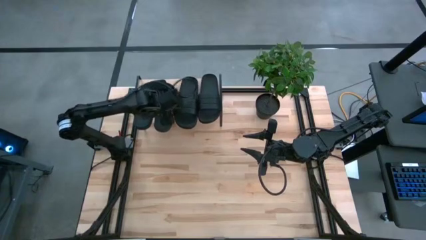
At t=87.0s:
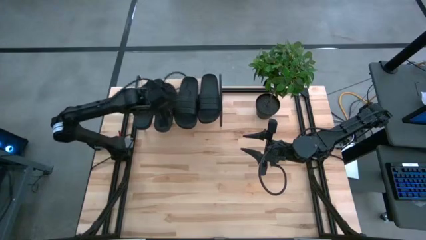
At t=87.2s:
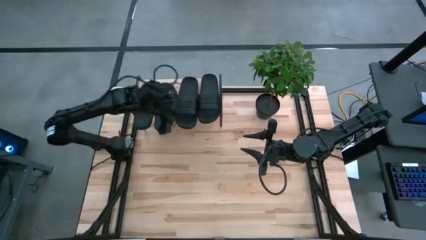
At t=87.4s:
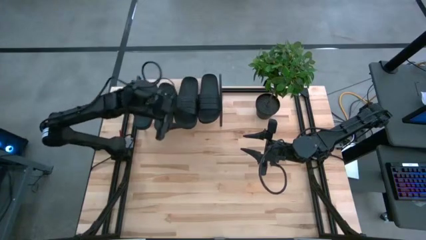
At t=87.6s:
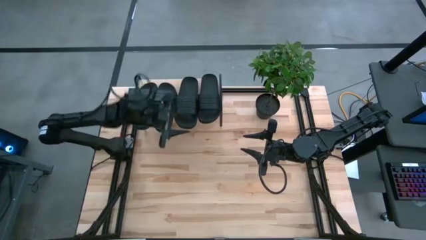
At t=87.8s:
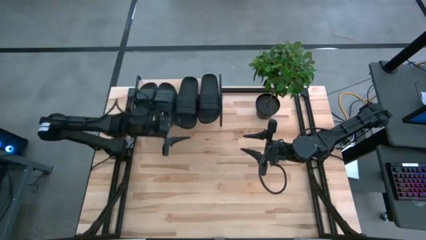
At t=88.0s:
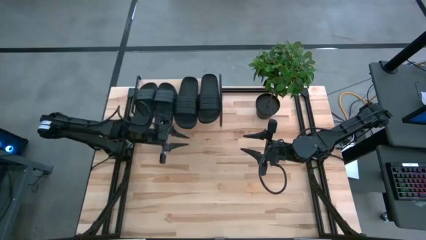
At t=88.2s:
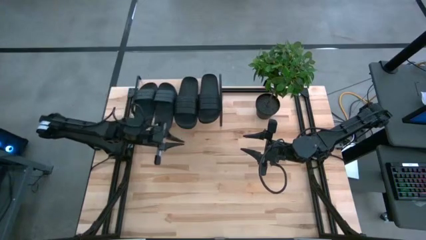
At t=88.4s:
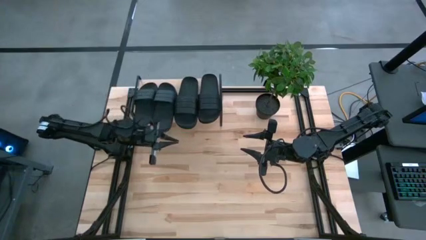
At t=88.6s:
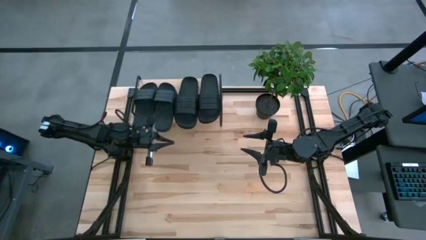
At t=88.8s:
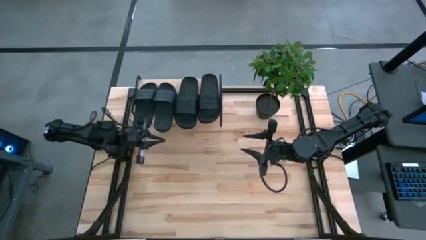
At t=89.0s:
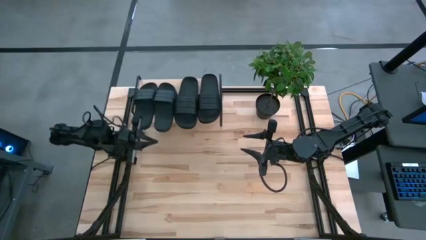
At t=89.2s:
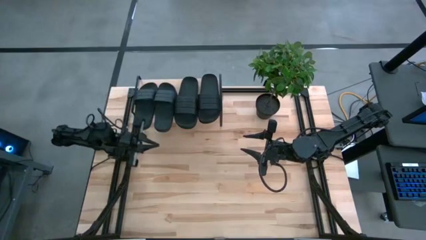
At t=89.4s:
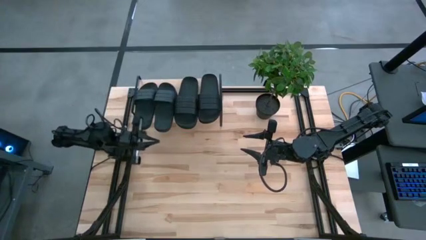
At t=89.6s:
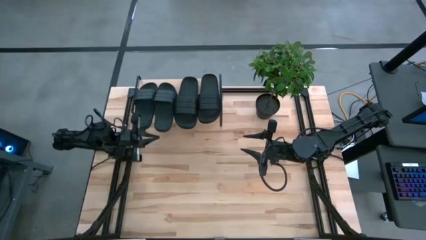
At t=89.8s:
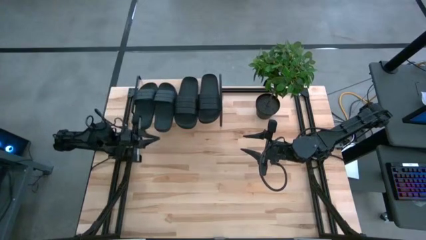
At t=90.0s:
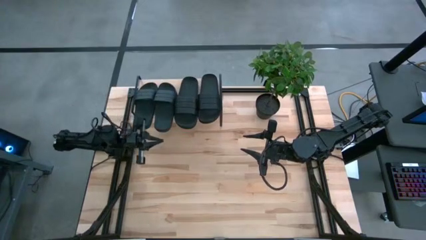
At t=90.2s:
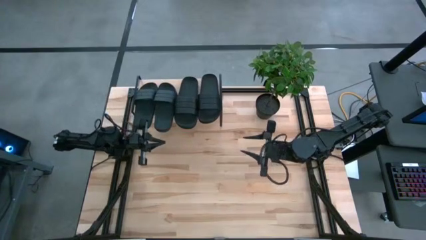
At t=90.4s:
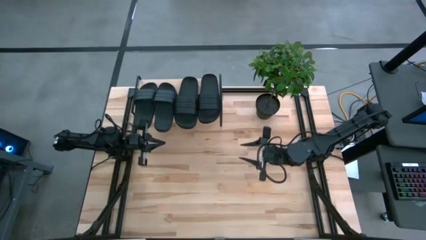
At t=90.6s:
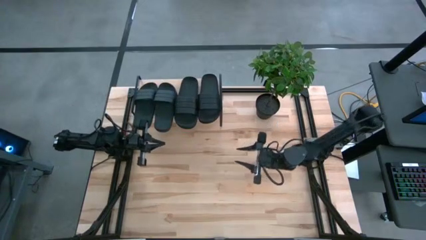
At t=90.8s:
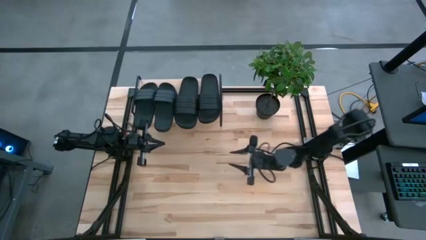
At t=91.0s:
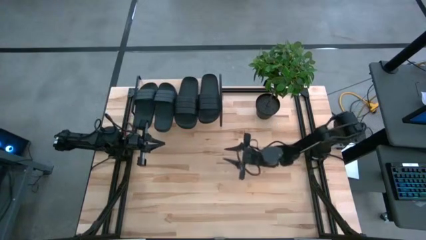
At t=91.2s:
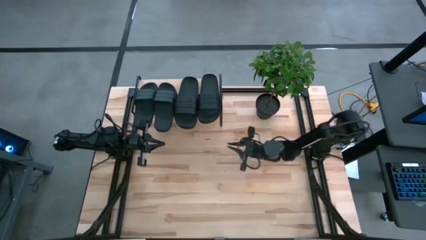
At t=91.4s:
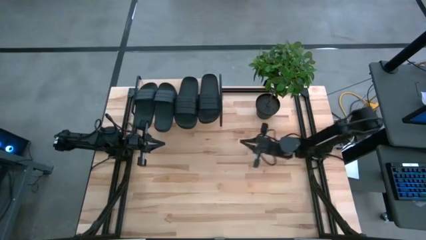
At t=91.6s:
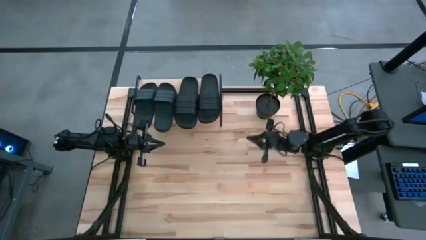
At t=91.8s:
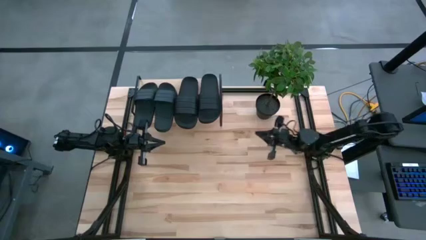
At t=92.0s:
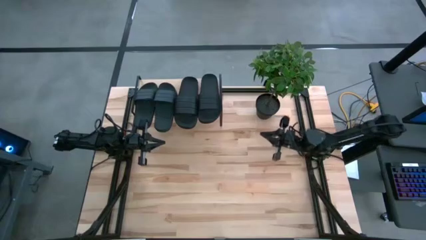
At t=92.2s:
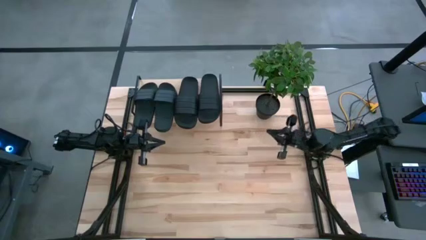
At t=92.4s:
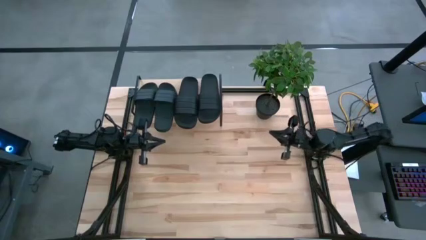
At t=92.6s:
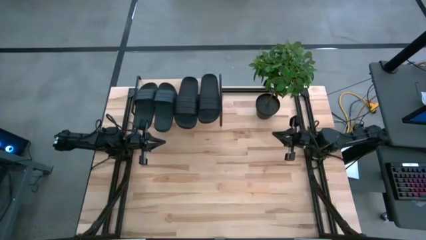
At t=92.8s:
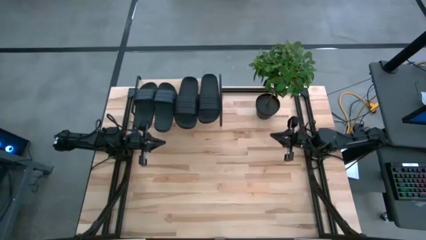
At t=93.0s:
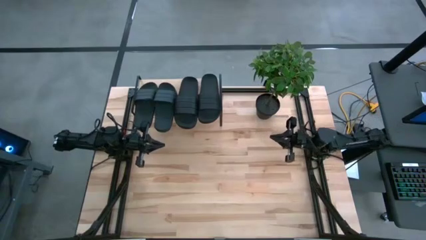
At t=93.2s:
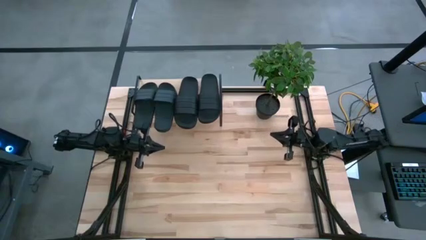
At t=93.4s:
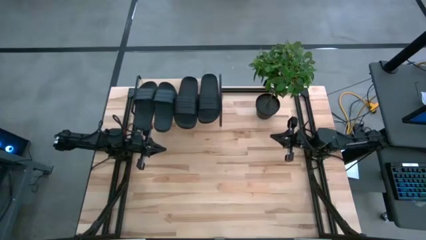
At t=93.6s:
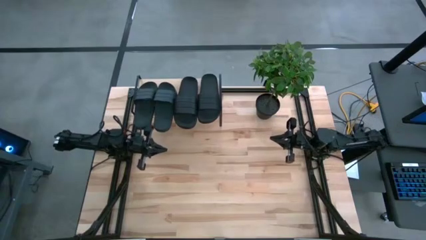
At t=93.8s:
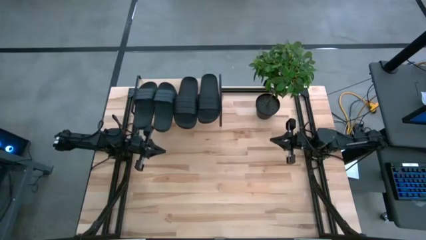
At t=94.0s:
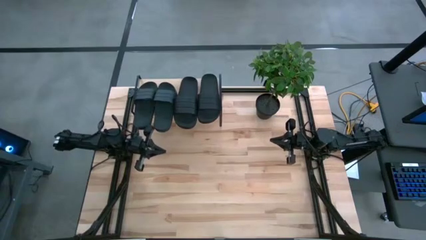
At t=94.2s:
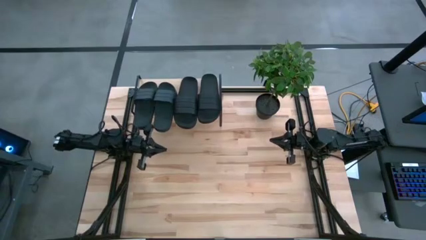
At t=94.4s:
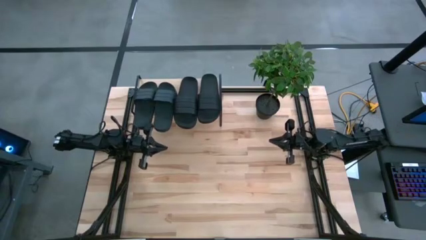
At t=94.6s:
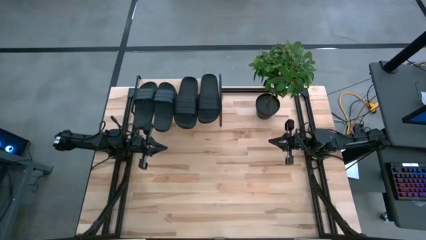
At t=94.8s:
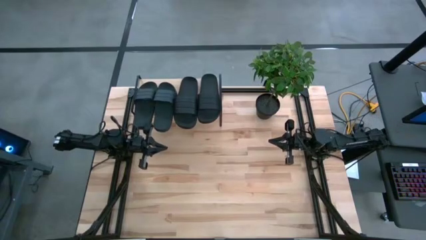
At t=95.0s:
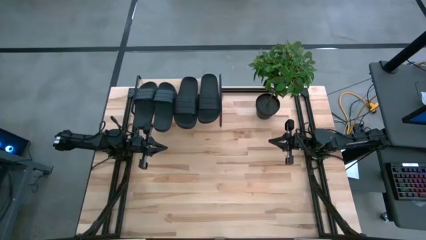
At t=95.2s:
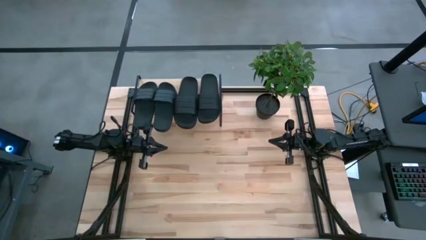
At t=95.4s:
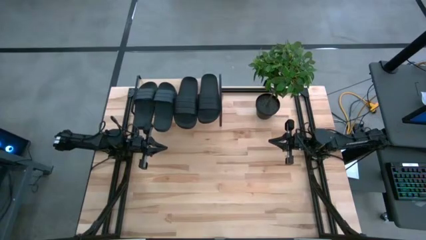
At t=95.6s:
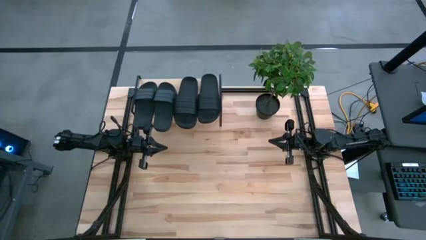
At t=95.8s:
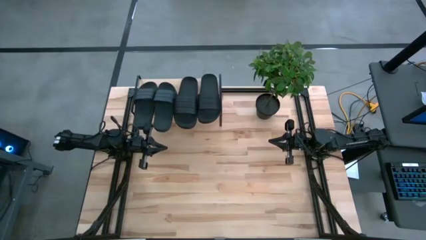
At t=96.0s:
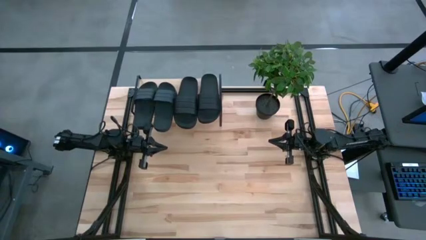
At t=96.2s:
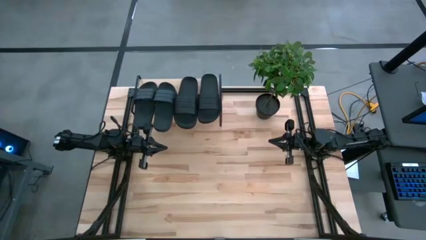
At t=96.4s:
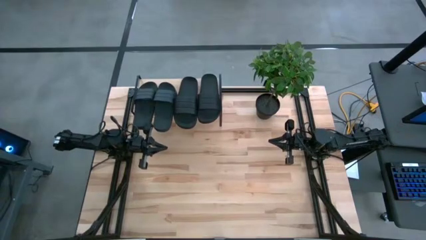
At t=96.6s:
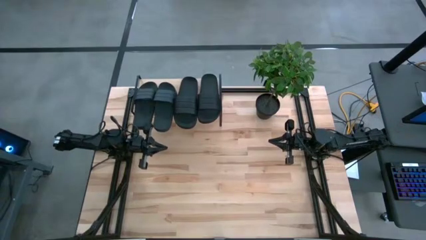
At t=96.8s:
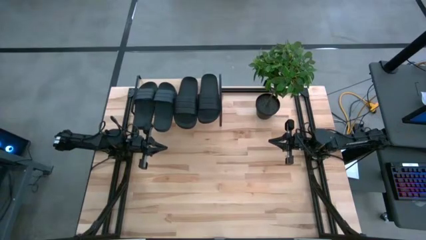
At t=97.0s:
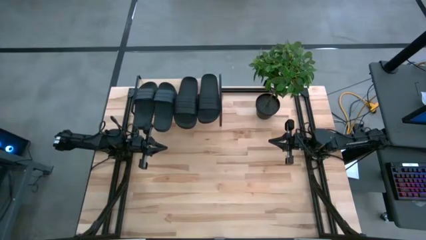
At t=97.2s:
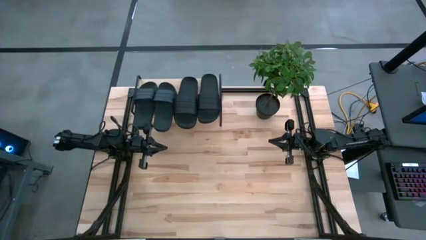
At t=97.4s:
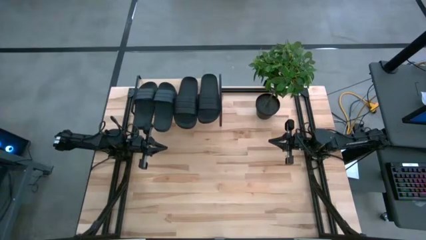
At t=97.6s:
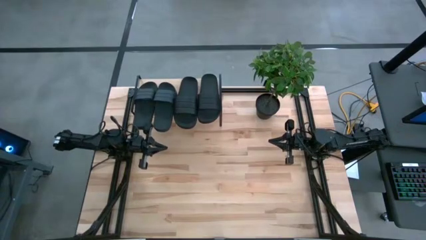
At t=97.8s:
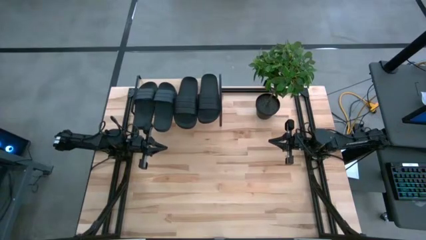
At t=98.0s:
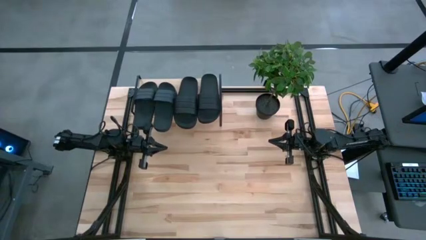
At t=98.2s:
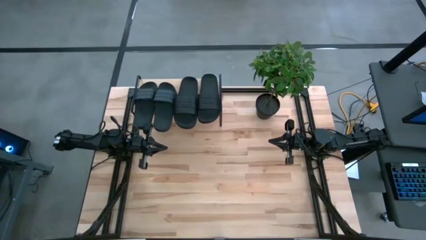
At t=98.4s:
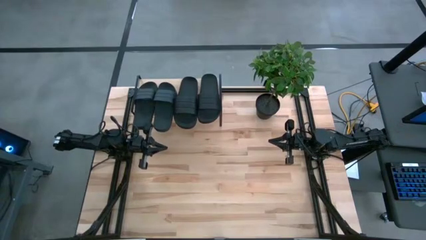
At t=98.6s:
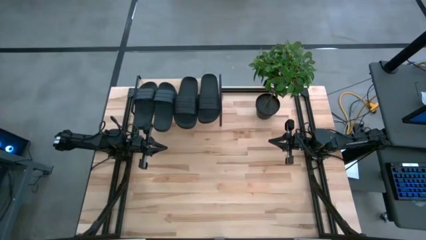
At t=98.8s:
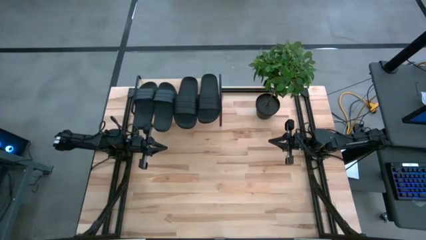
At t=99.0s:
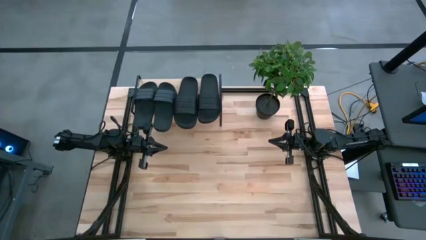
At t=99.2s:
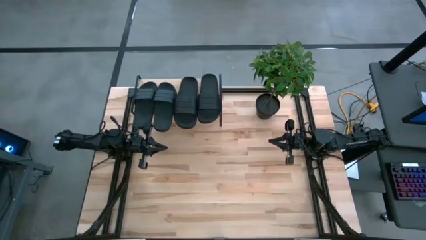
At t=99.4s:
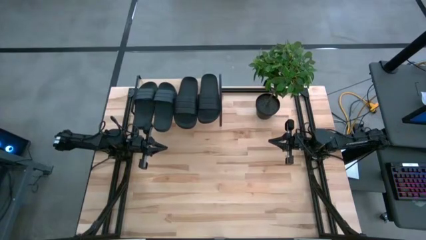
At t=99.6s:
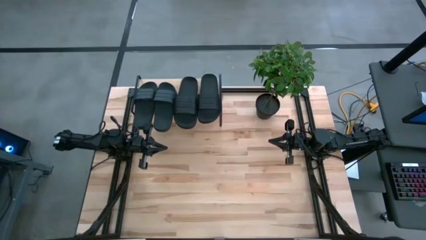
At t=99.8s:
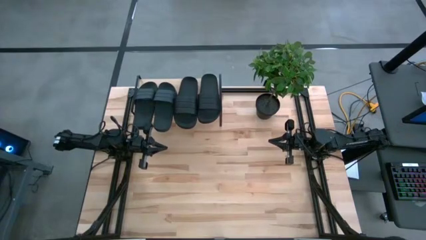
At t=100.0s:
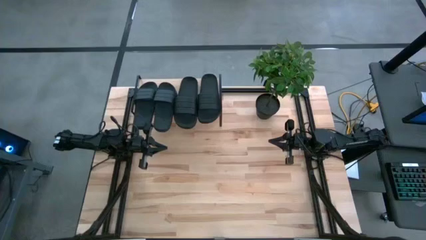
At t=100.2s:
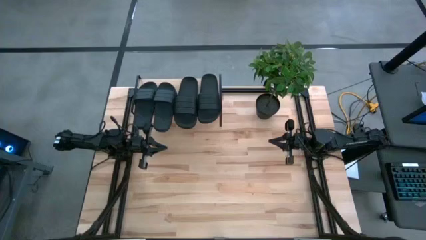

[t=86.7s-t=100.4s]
Task: Pick and place slides into the shelf
Return to Home Position
